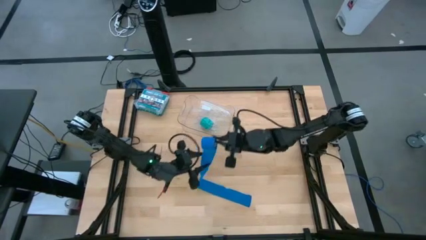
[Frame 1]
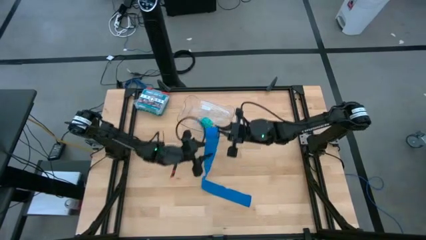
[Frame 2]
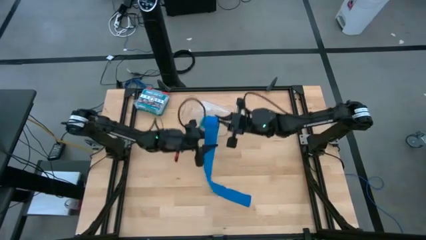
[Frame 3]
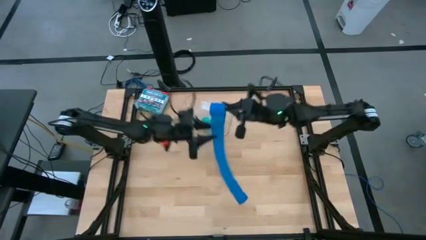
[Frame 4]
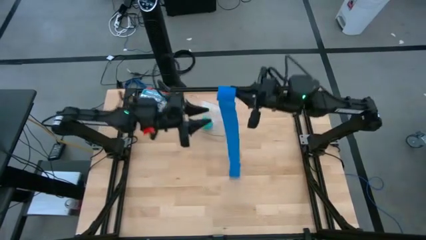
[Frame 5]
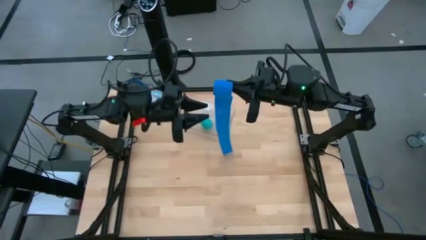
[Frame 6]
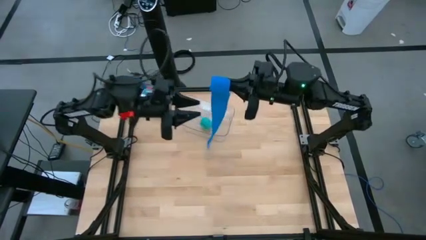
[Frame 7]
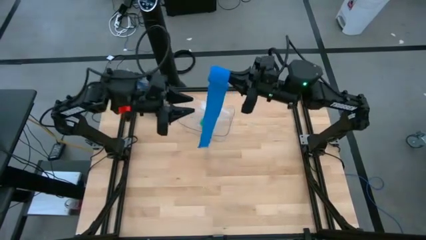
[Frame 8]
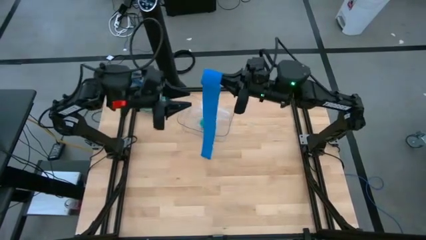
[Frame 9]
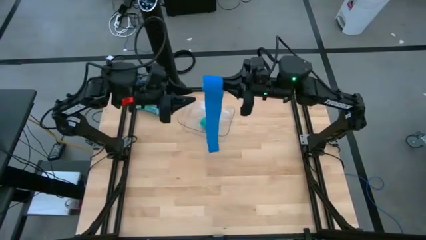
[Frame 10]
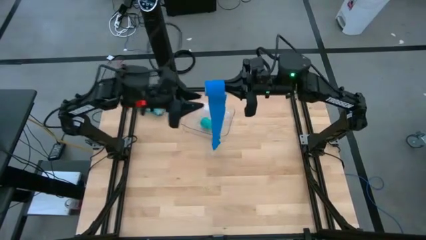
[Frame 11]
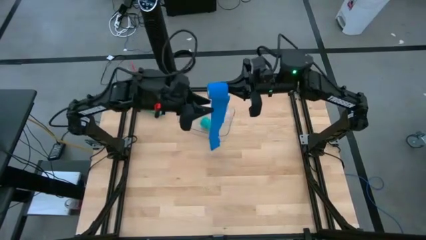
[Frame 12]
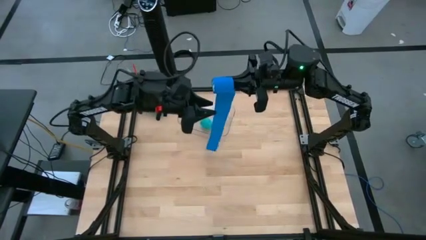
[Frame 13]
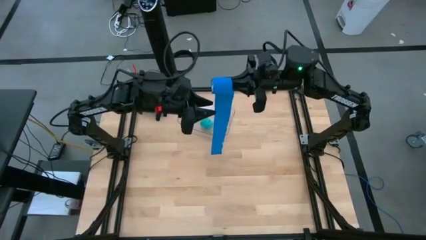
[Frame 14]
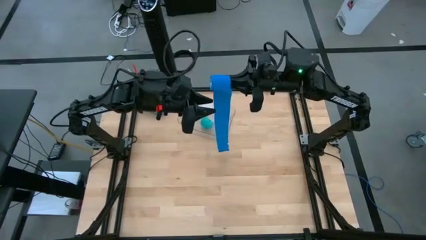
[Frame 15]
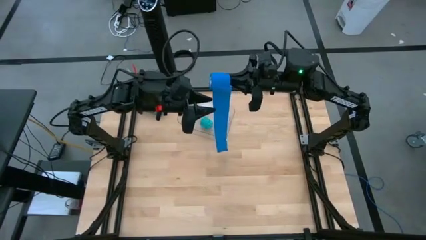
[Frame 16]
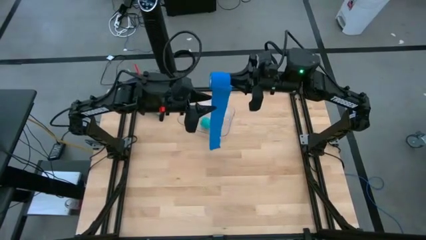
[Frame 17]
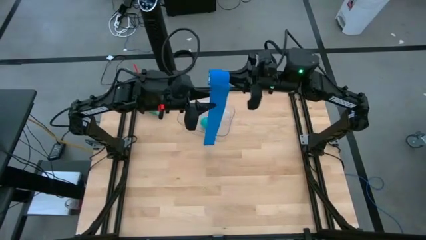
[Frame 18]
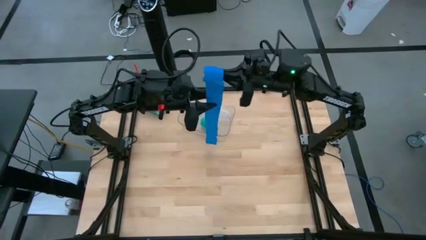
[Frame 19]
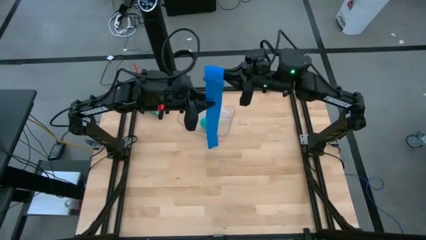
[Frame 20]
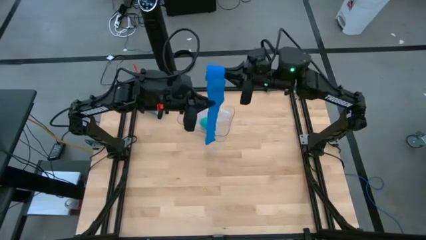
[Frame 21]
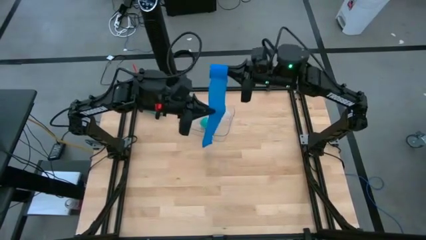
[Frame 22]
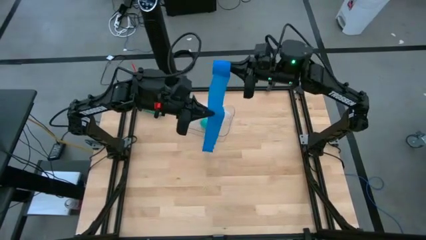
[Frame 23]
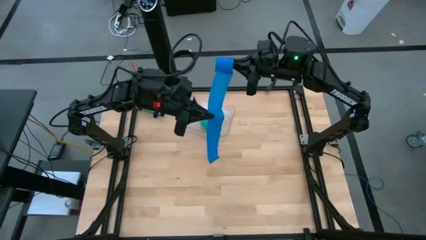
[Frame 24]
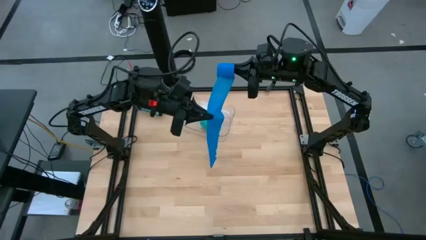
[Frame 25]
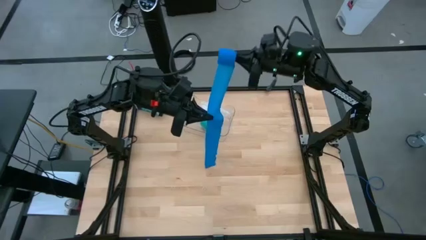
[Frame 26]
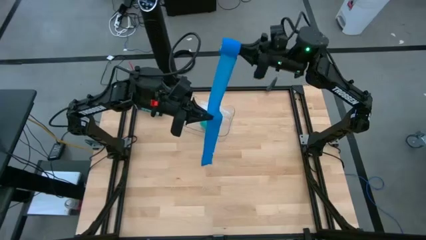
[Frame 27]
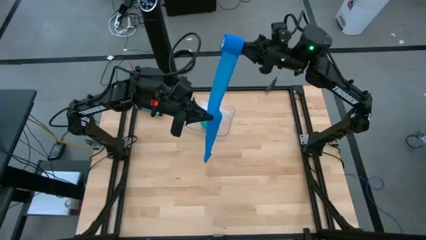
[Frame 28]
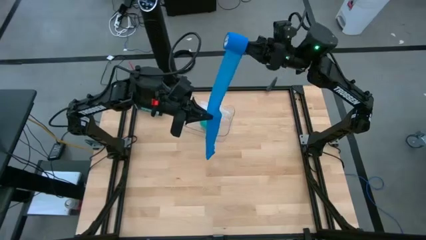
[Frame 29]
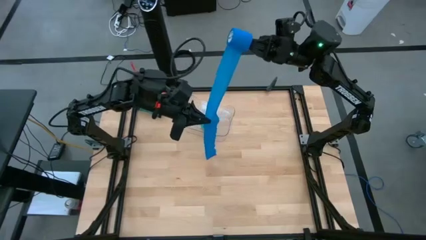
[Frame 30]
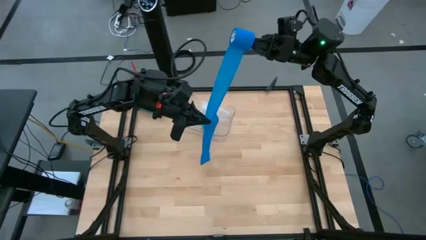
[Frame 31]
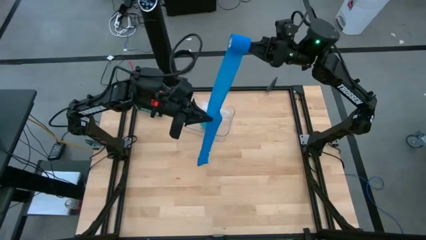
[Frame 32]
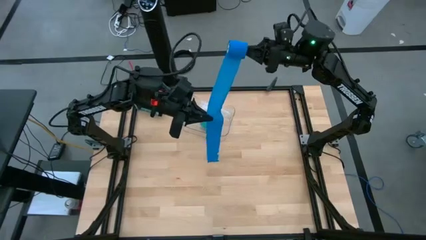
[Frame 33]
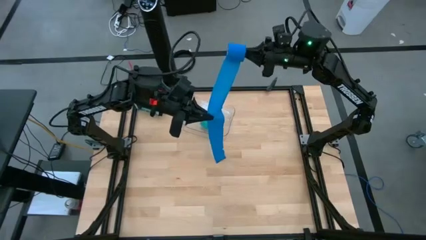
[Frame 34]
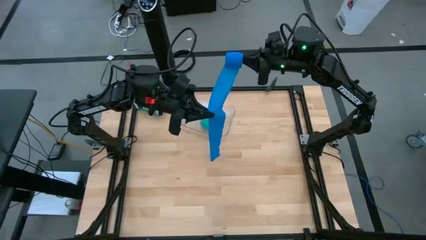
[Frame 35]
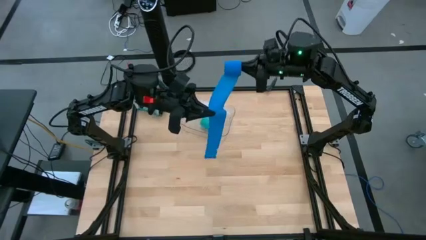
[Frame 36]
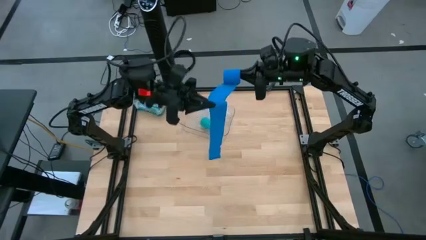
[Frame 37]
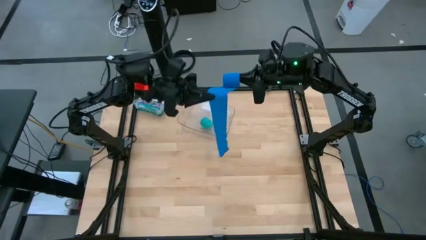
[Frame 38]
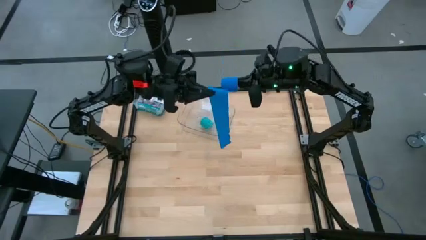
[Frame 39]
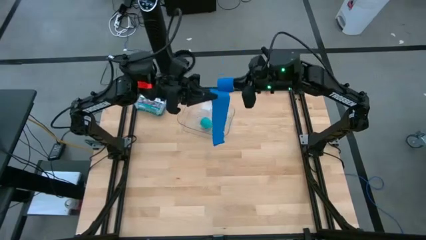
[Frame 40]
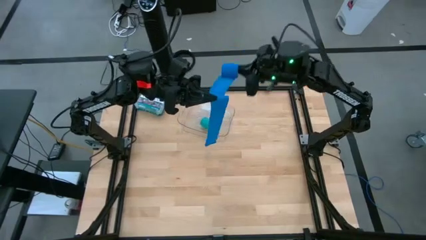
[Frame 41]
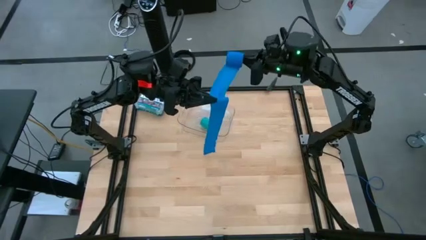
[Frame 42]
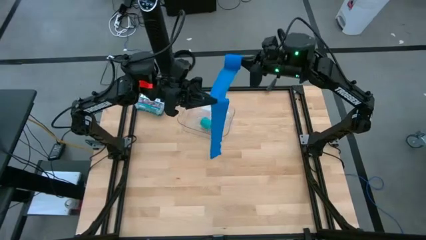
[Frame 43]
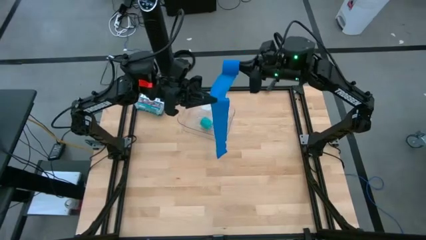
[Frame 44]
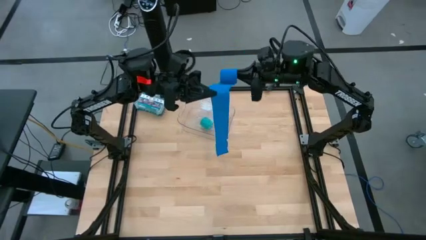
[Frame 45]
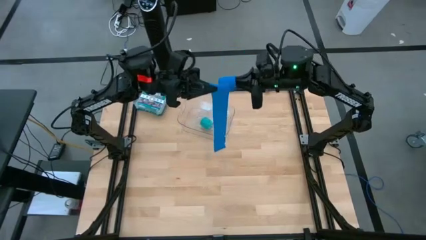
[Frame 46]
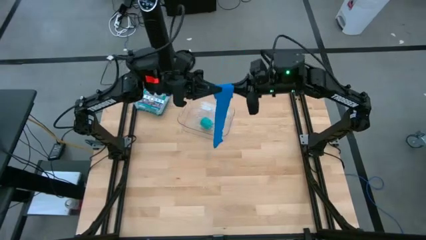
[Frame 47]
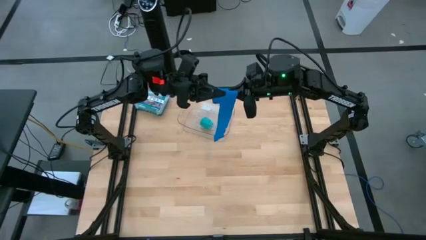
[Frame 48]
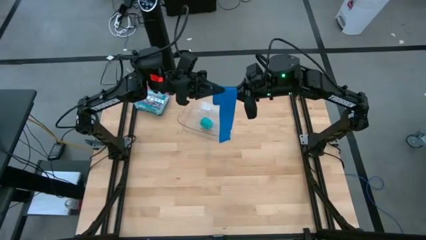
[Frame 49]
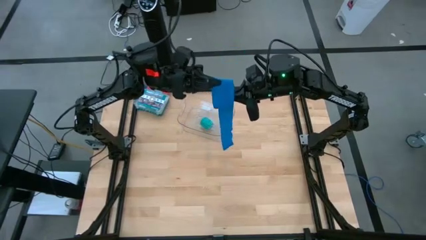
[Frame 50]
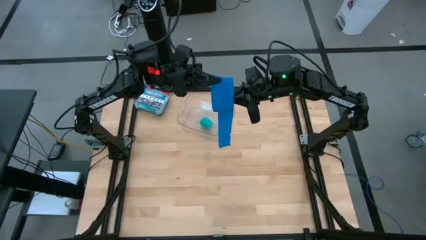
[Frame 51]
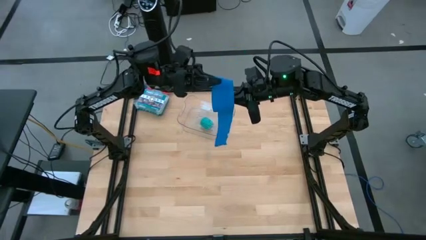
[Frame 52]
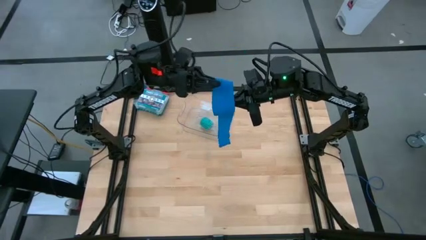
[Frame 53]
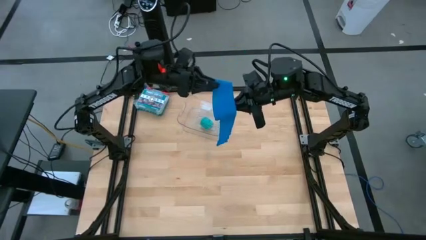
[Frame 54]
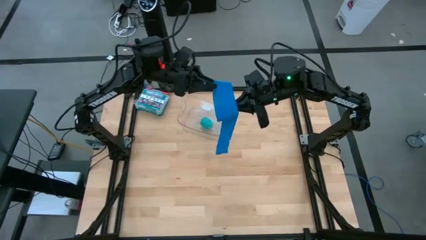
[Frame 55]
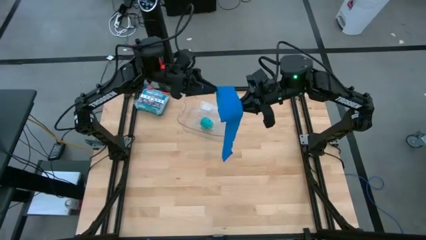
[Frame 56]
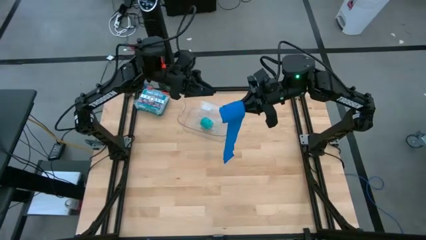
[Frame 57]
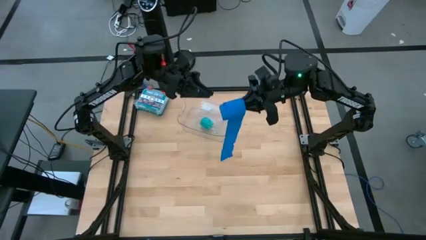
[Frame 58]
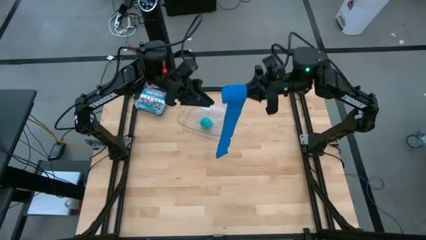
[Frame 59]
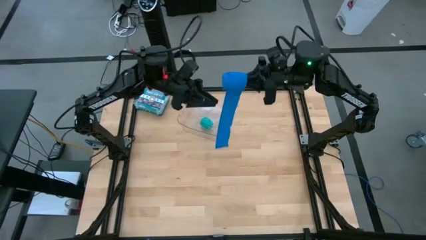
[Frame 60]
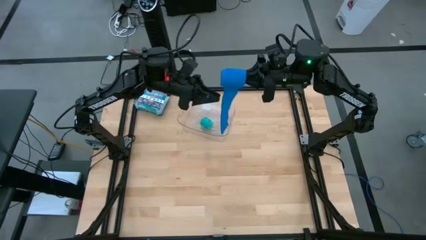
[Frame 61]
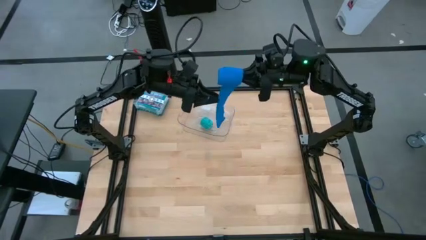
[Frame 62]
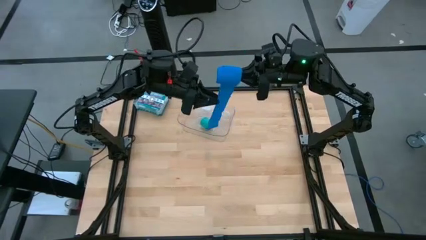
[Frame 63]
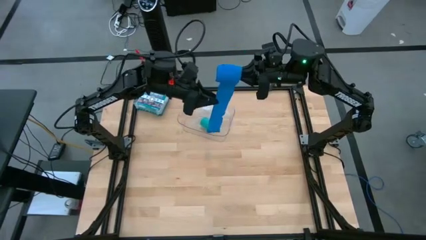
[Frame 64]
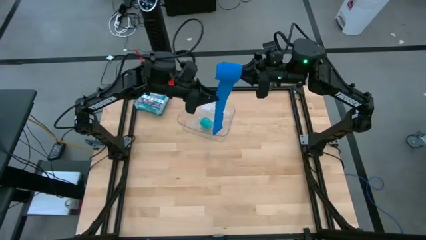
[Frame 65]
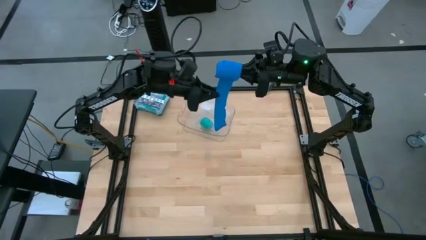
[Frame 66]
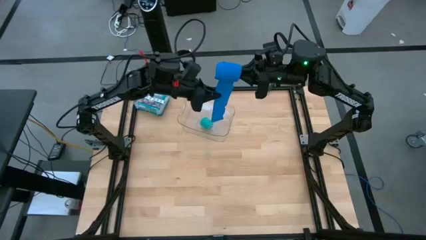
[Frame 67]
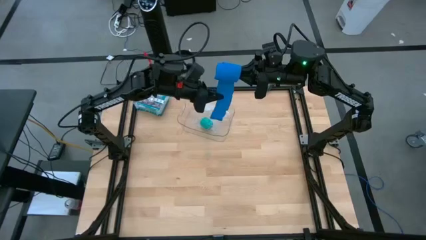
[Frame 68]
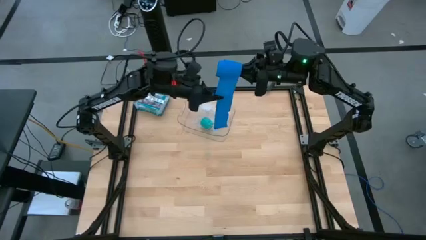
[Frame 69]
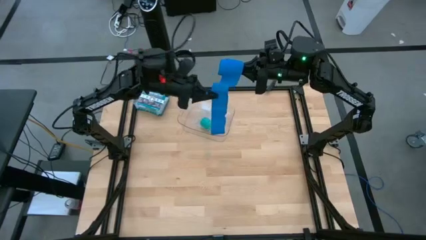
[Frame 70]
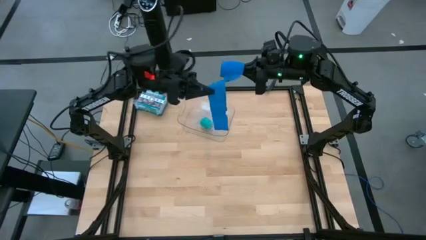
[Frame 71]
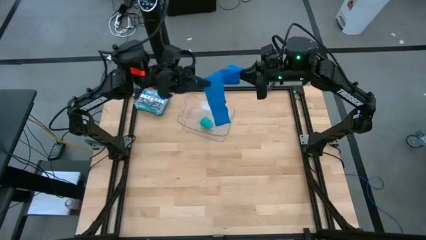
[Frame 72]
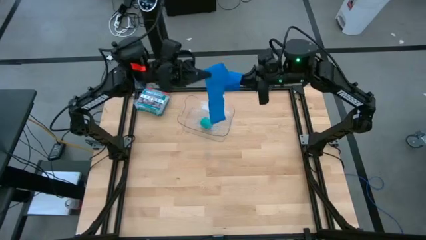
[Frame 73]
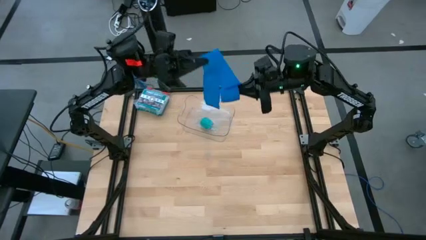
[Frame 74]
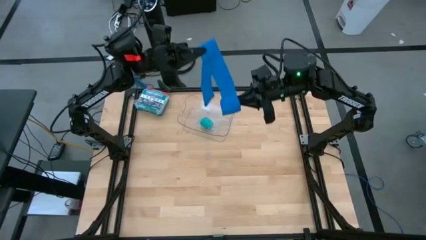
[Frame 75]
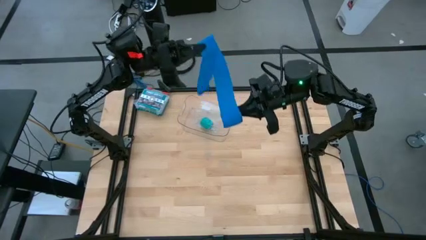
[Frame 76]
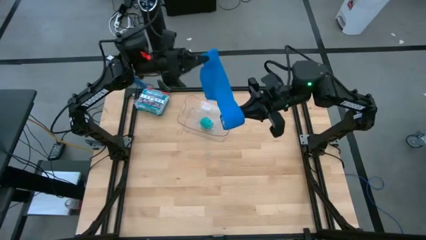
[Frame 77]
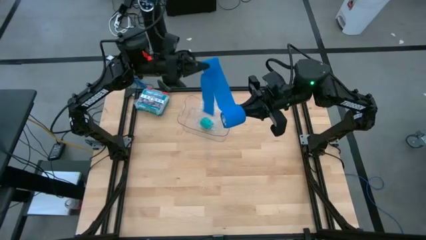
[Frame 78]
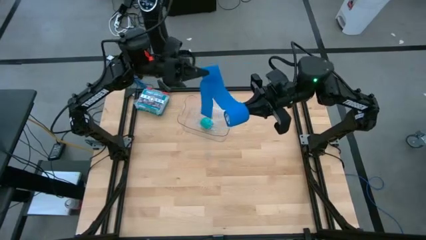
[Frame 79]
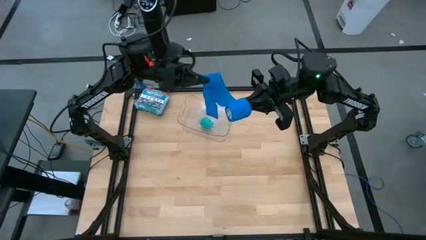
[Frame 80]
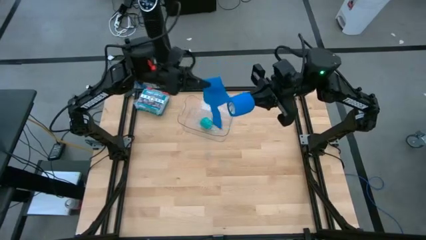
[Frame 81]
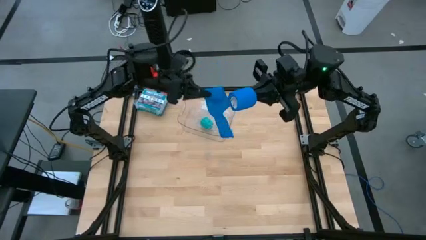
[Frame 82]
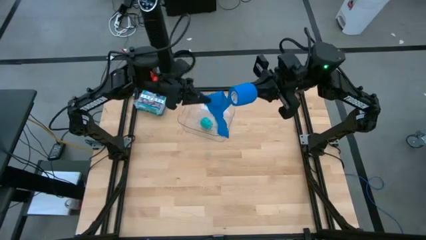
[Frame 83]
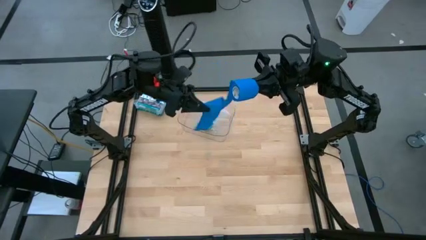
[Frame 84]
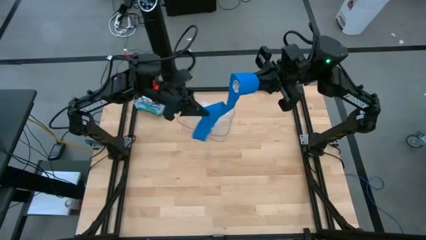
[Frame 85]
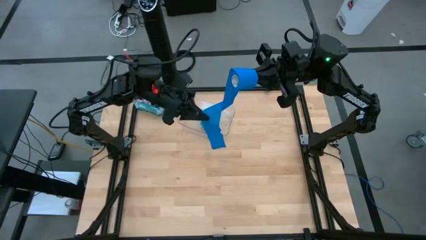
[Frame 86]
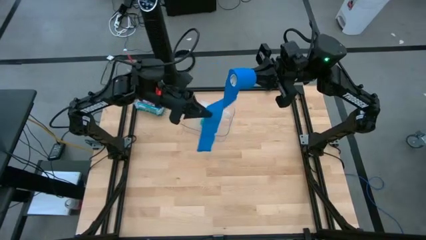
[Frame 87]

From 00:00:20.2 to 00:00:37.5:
Task: Roll bandage
Roll the blue bandage
